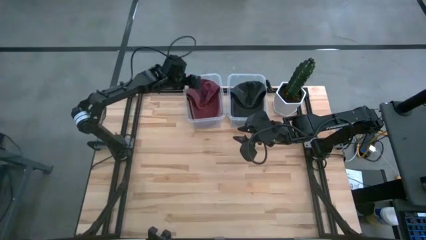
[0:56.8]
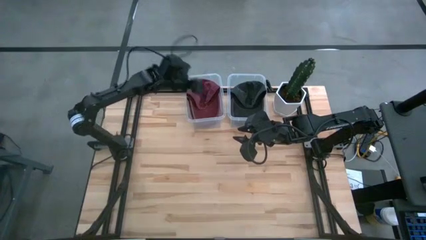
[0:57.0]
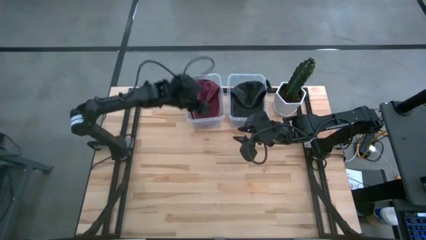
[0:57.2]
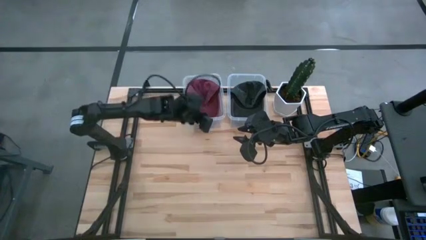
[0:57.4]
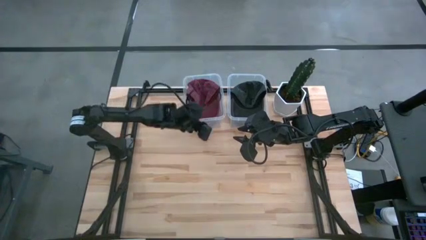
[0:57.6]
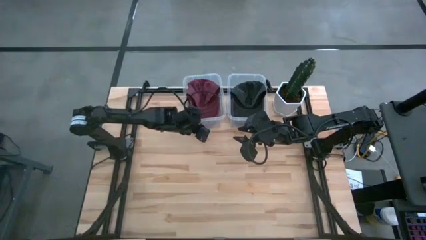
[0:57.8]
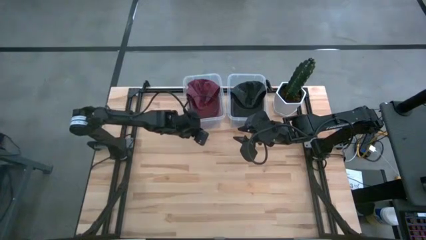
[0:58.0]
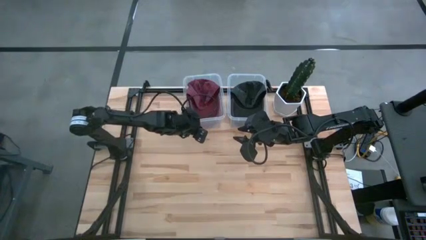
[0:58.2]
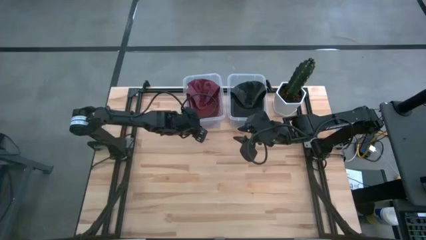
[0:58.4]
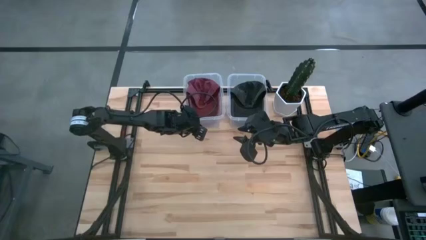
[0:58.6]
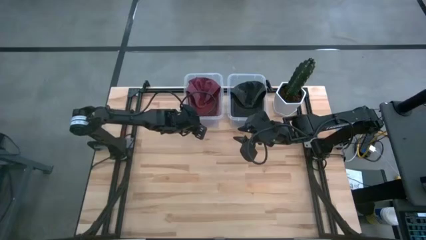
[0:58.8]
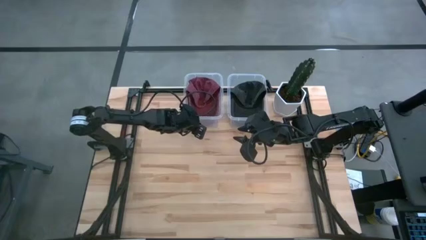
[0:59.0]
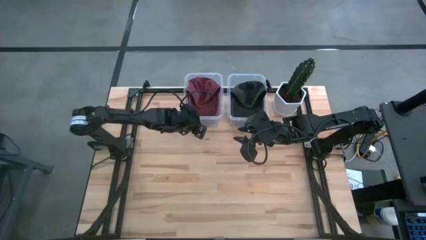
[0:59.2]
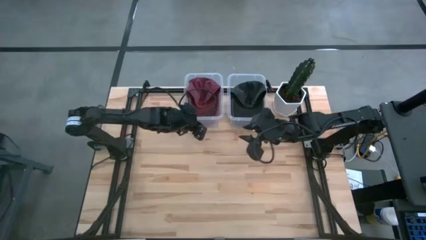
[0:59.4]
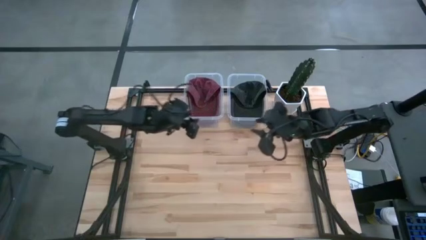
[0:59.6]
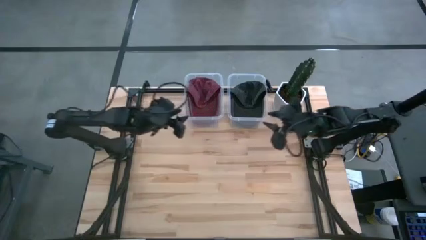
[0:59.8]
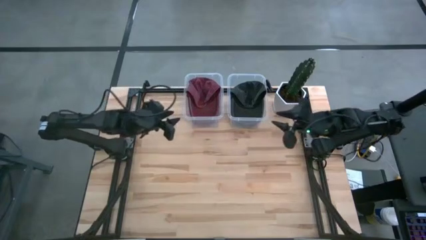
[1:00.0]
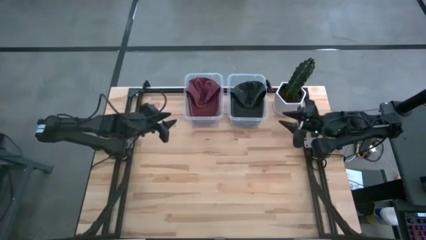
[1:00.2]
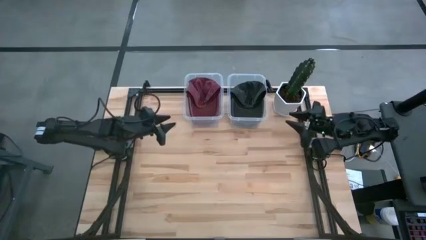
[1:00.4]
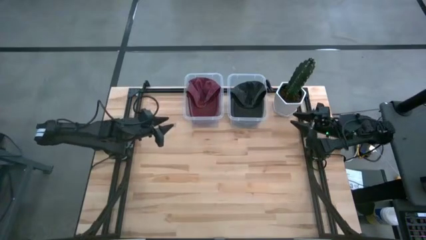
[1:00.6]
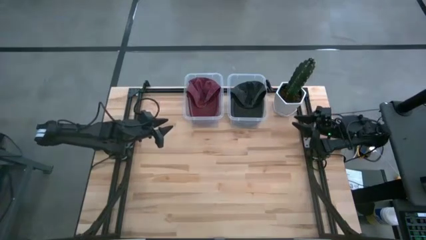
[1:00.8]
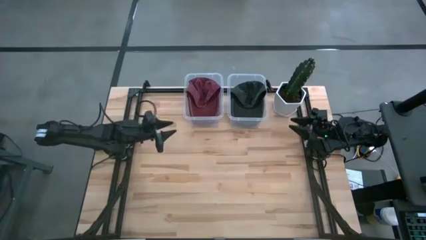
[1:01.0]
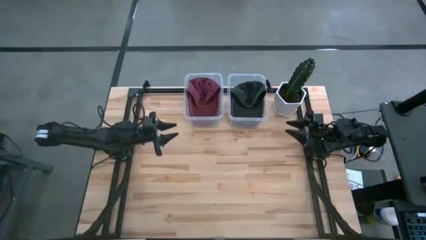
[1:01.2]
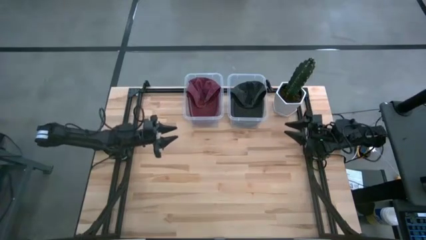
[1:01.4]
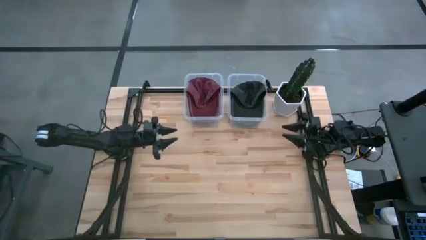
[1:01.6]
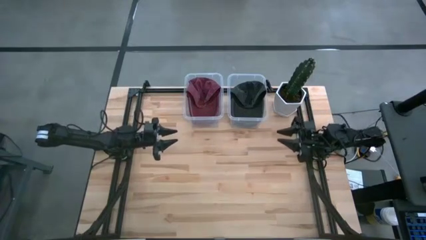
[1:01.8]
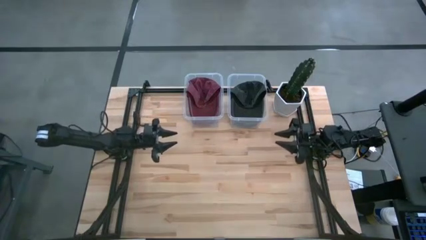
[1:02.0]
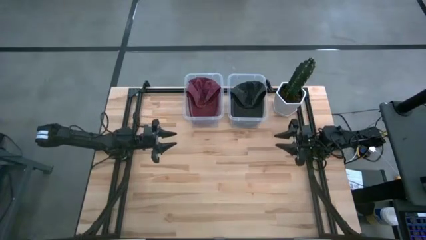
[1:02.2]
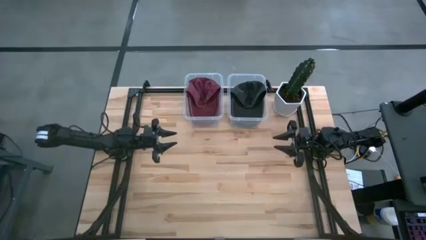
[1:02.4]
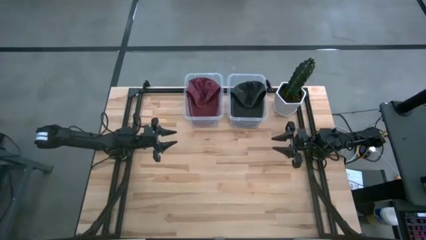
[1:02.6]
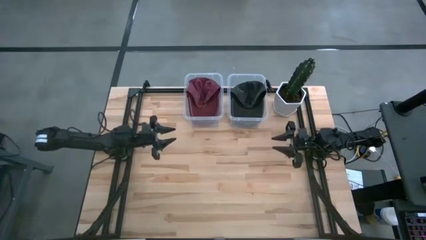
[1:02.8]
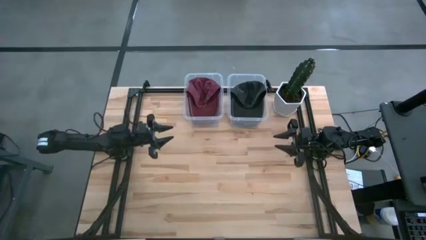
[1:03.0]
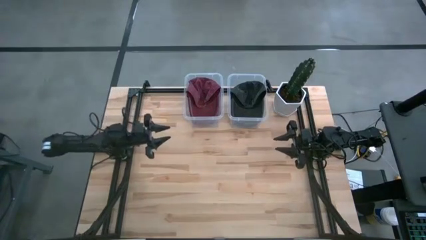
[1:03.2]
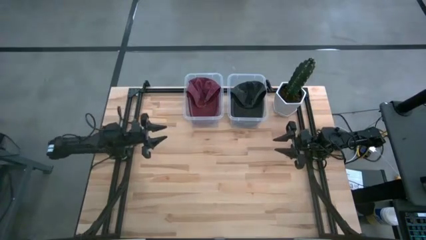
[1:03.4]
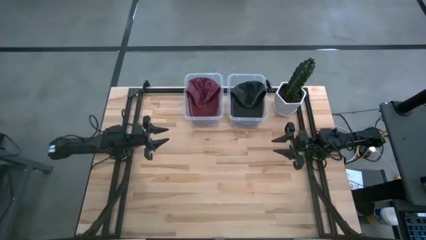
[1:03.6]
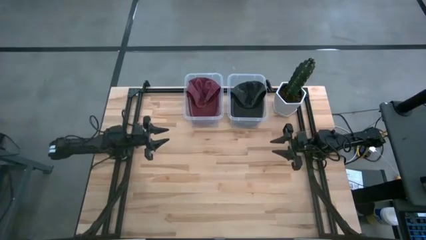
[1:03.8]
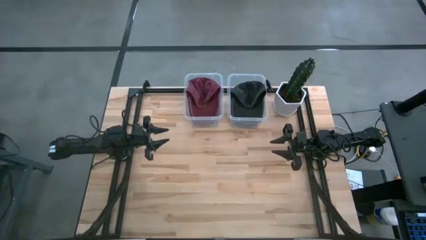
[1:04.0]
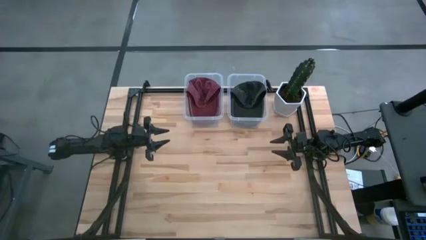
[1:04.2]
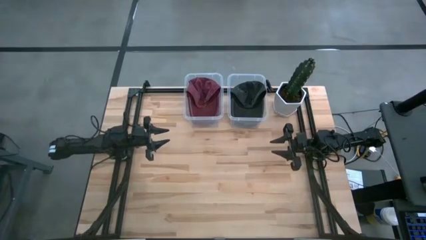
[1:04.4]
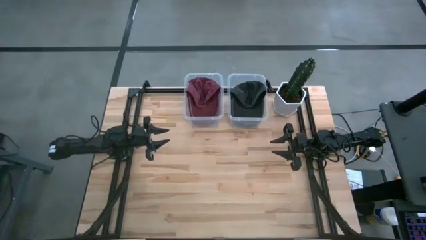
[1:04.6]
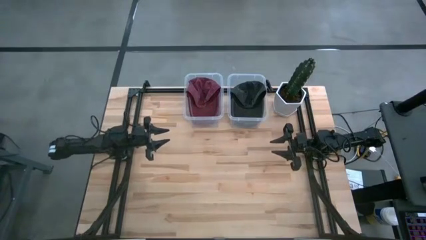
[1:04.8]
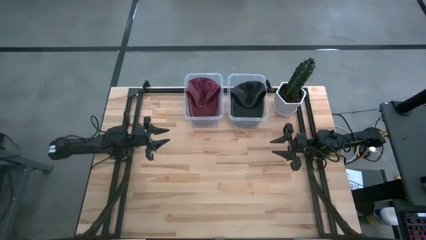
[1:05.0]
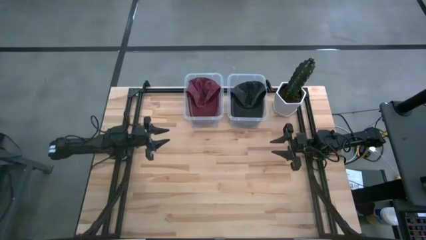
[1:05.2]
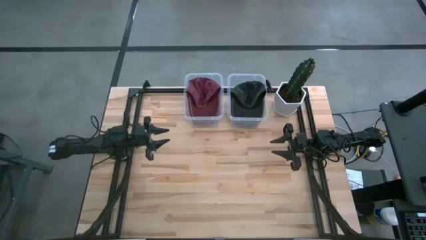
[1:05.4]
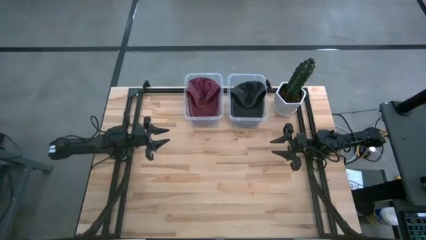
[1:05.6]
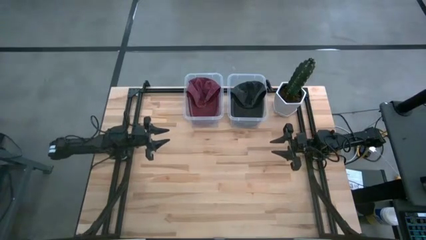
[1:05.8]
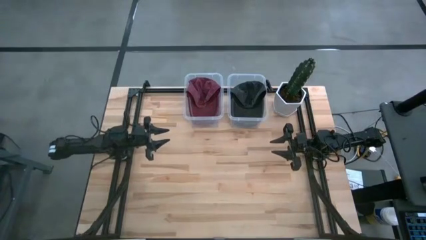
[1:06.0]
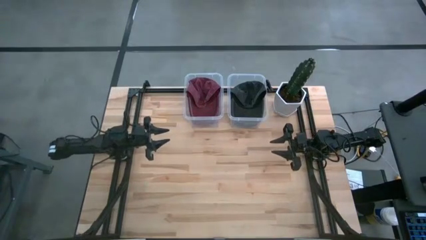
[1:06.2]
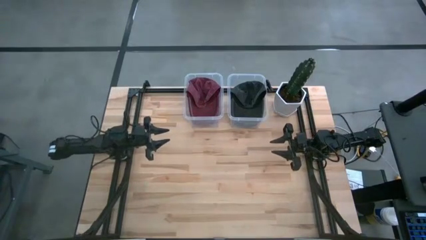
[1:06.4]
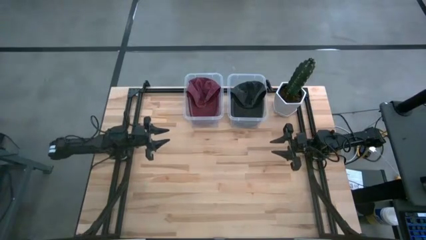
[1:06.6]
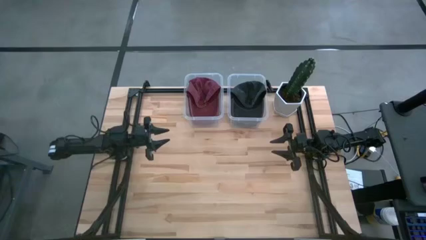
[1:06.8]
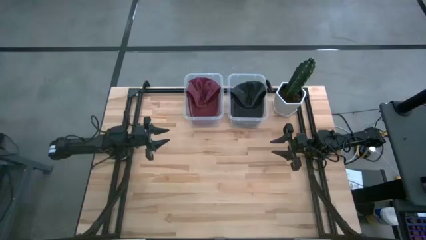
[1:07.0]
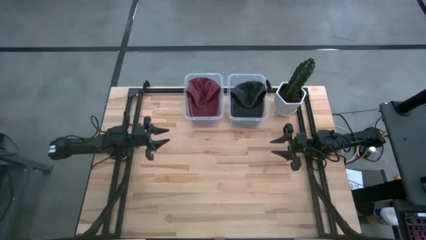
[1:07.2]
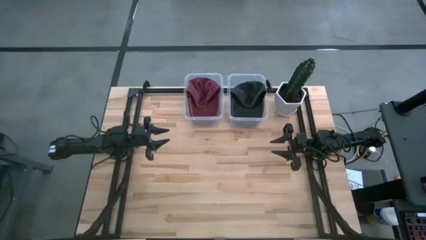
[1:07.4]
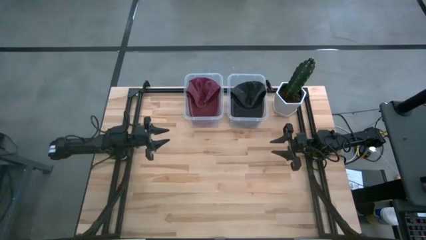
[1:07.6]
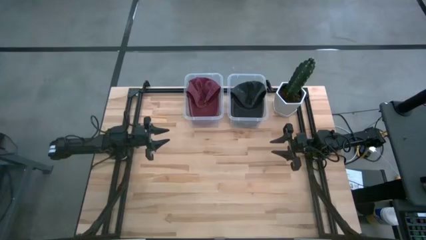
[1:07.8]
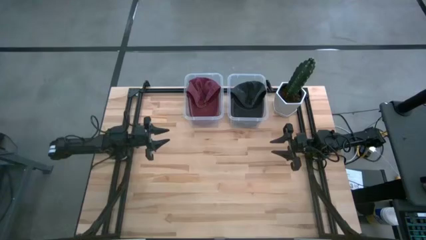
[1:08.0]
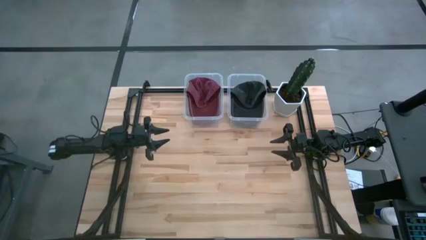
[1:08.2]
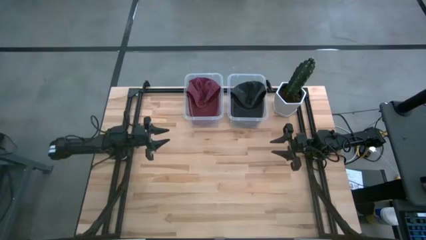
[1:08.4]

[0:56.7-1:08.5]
Task: Pick & Place hat
Return to Home Position
